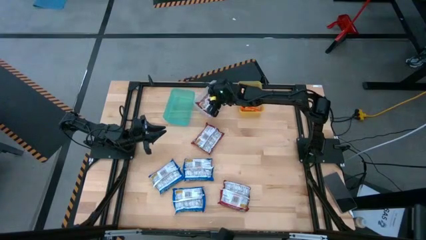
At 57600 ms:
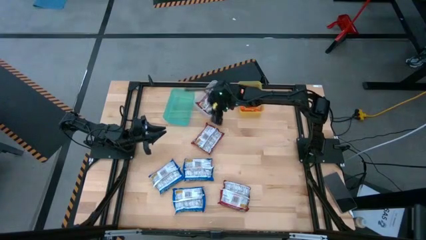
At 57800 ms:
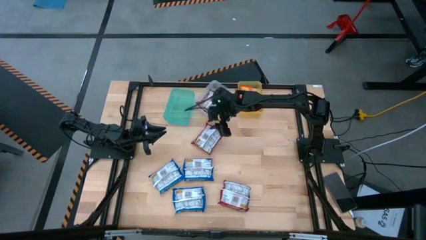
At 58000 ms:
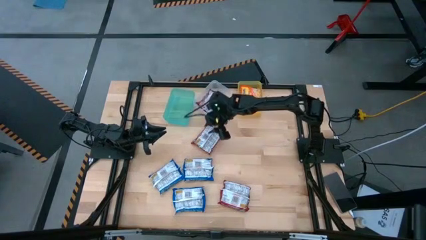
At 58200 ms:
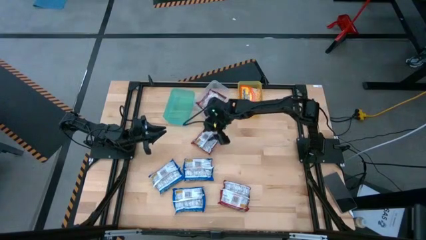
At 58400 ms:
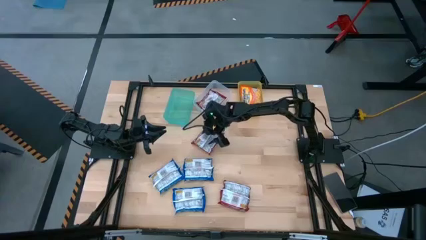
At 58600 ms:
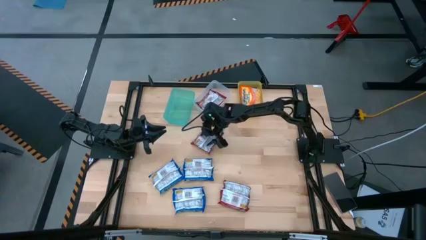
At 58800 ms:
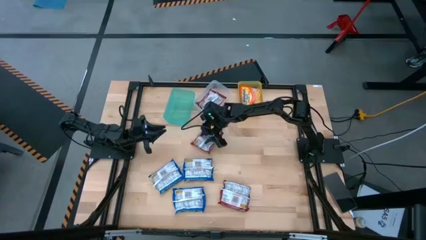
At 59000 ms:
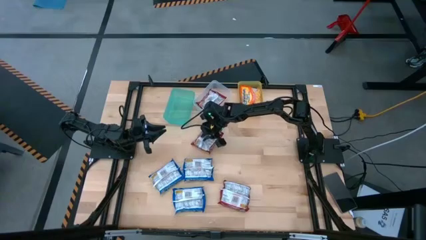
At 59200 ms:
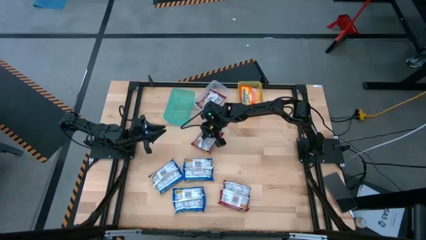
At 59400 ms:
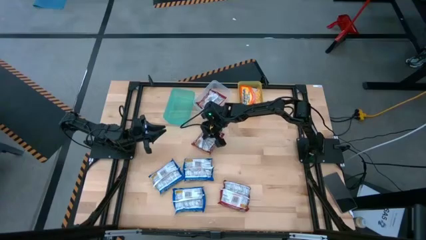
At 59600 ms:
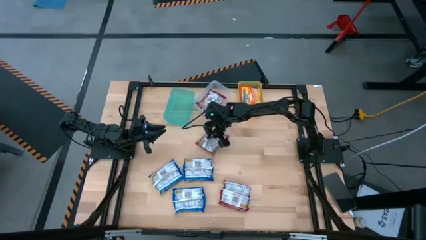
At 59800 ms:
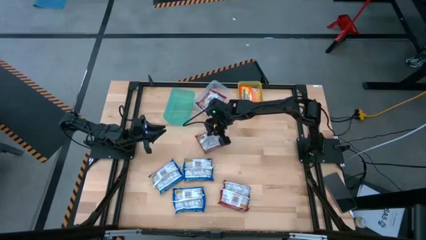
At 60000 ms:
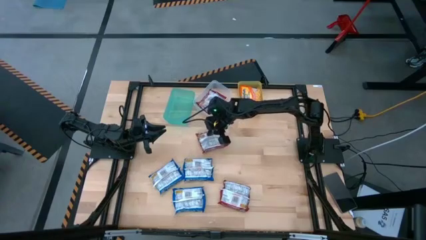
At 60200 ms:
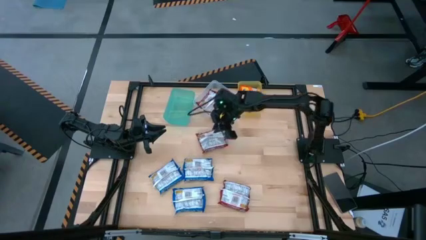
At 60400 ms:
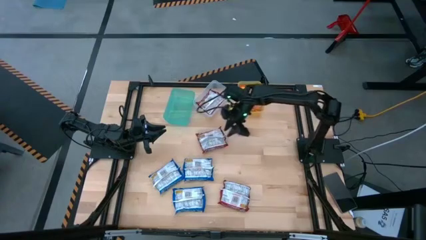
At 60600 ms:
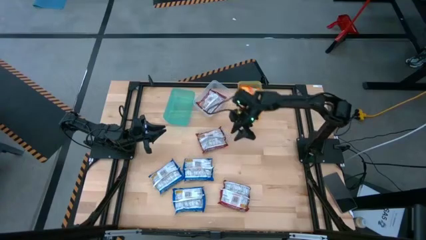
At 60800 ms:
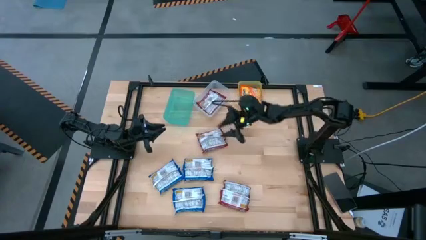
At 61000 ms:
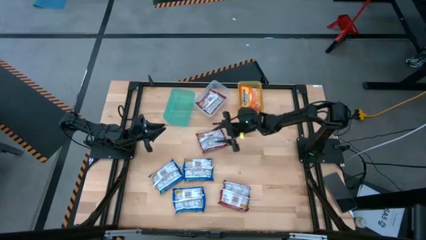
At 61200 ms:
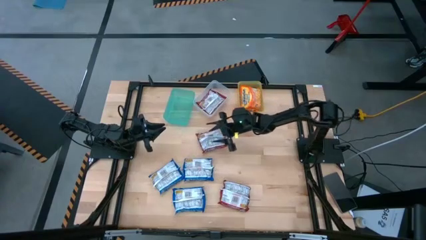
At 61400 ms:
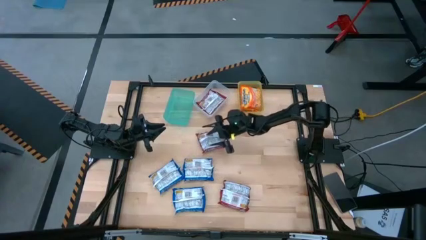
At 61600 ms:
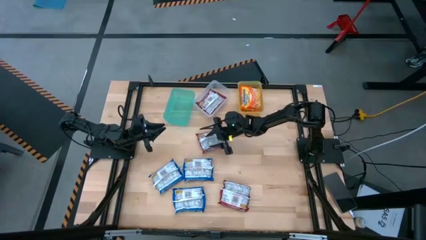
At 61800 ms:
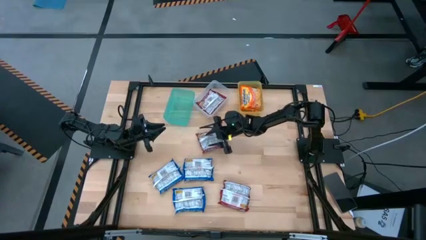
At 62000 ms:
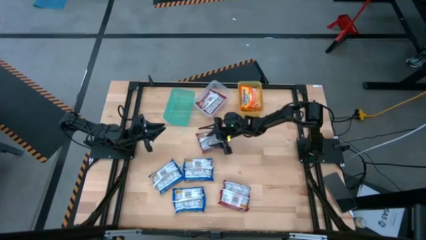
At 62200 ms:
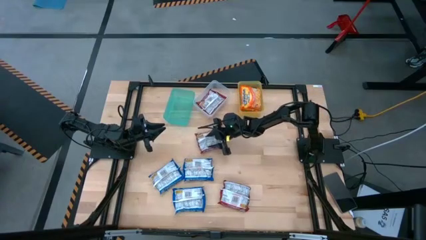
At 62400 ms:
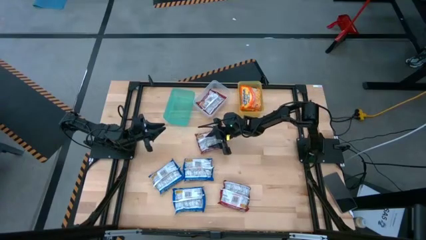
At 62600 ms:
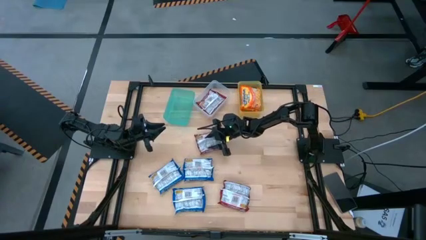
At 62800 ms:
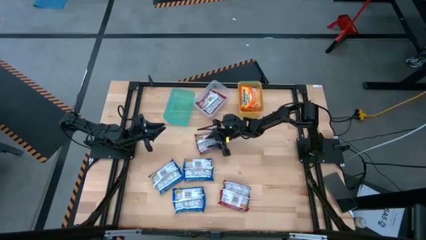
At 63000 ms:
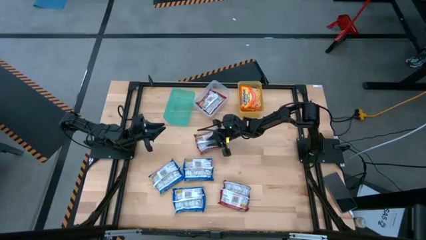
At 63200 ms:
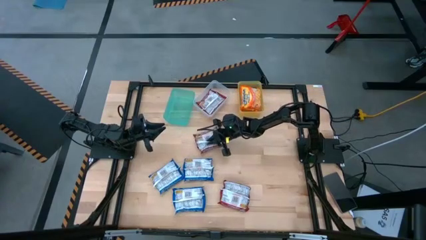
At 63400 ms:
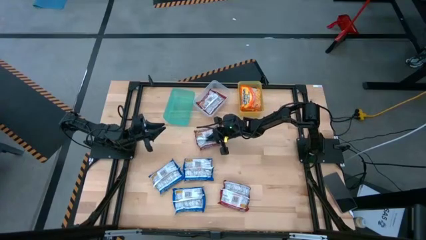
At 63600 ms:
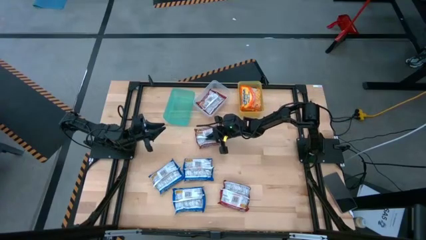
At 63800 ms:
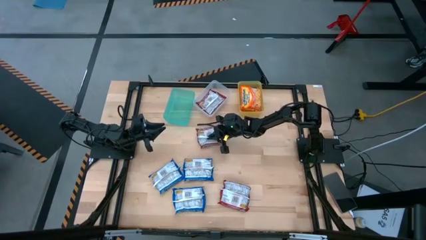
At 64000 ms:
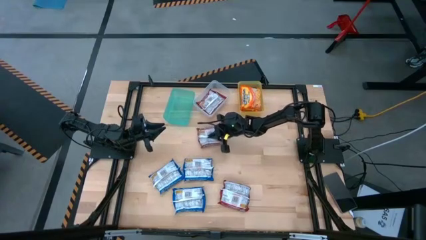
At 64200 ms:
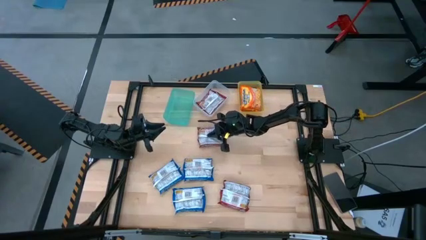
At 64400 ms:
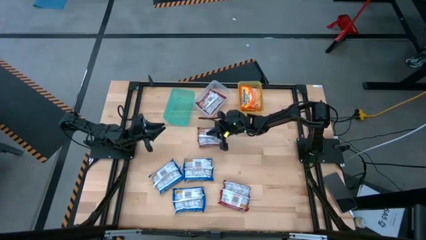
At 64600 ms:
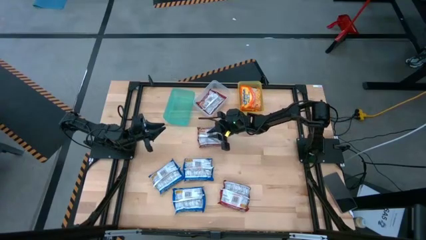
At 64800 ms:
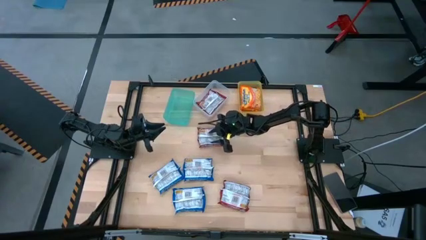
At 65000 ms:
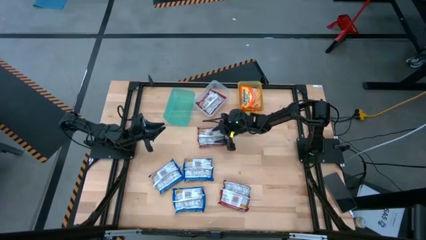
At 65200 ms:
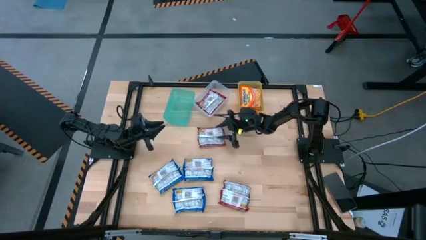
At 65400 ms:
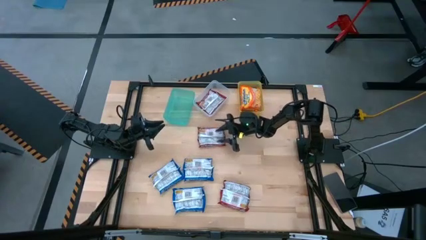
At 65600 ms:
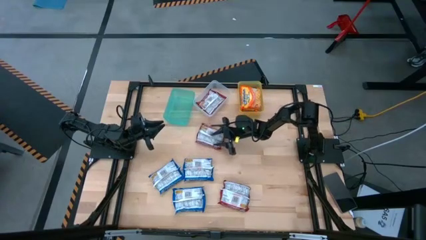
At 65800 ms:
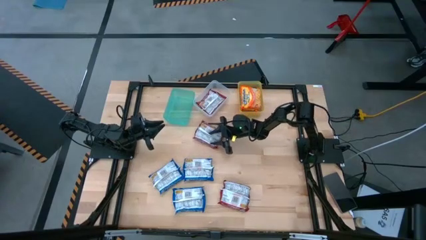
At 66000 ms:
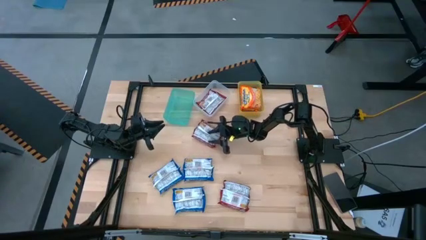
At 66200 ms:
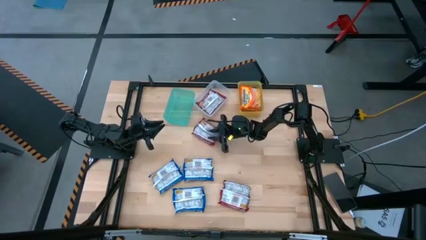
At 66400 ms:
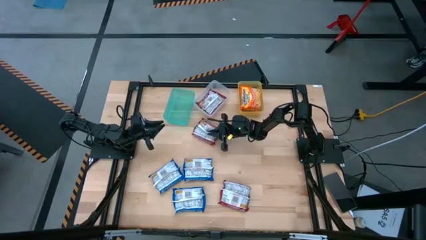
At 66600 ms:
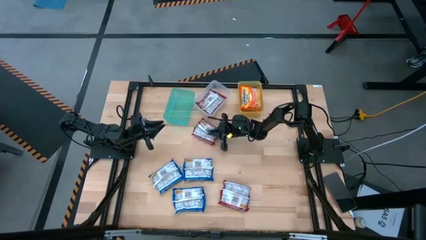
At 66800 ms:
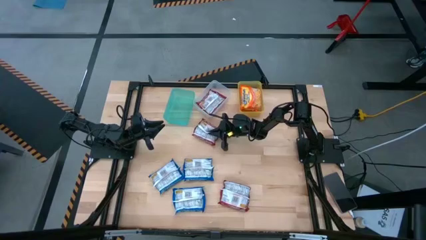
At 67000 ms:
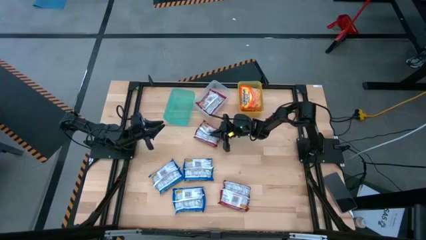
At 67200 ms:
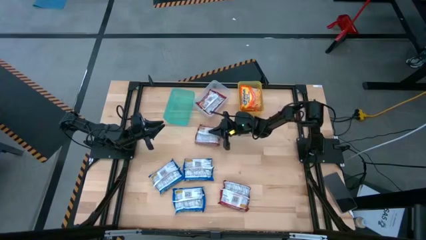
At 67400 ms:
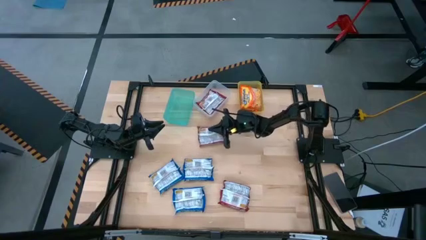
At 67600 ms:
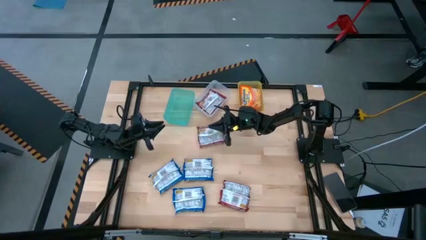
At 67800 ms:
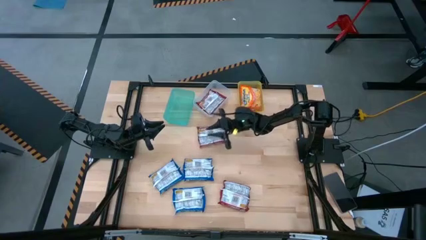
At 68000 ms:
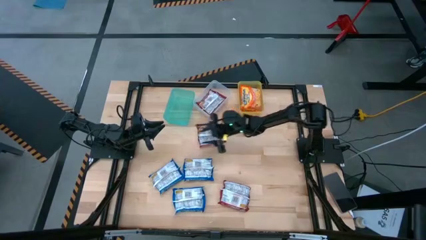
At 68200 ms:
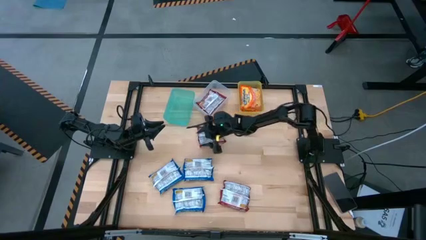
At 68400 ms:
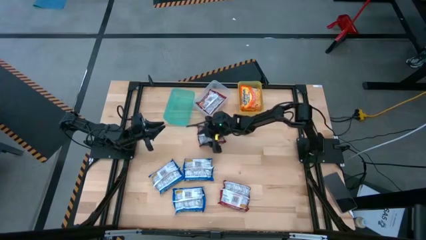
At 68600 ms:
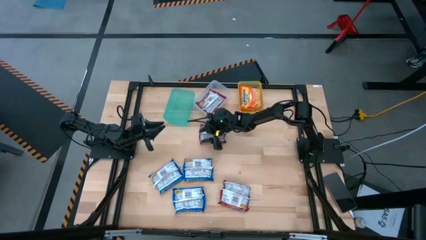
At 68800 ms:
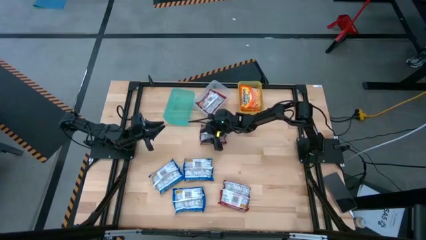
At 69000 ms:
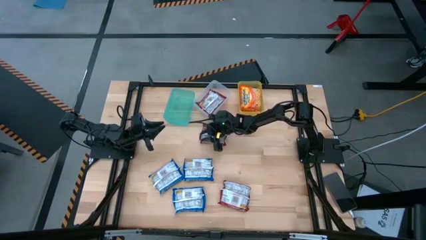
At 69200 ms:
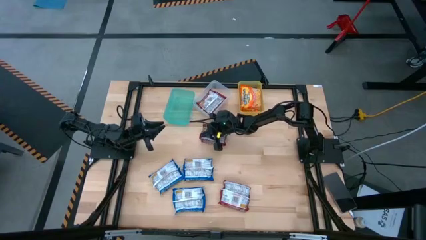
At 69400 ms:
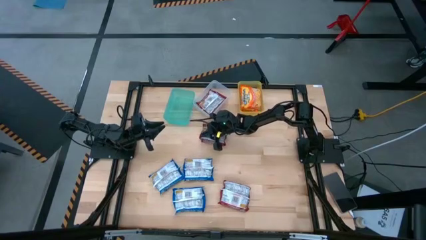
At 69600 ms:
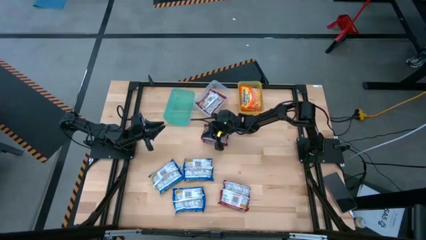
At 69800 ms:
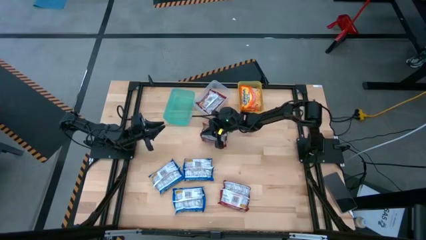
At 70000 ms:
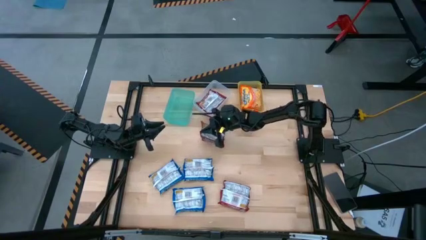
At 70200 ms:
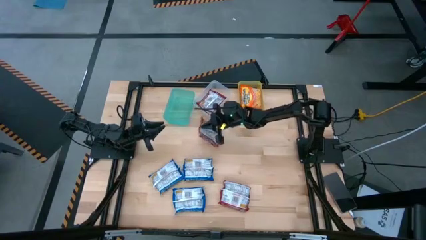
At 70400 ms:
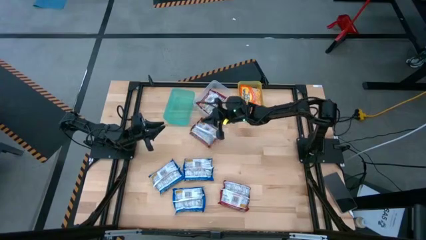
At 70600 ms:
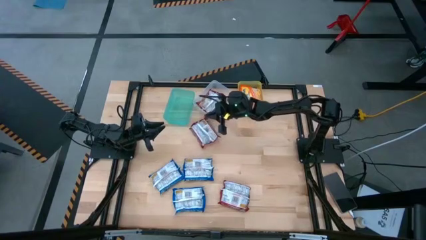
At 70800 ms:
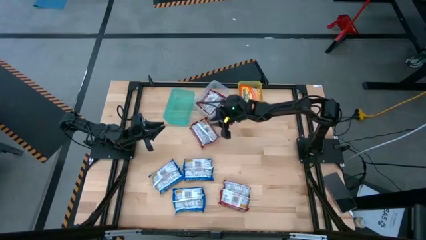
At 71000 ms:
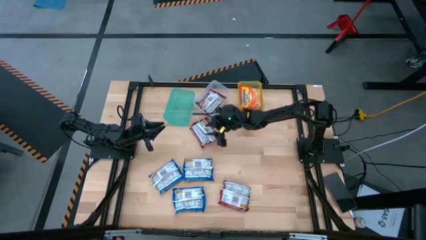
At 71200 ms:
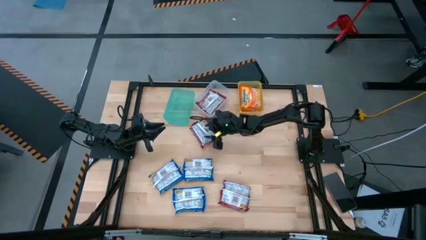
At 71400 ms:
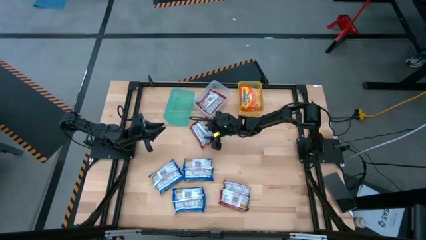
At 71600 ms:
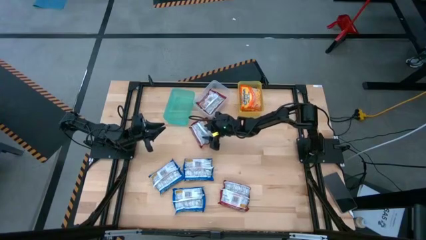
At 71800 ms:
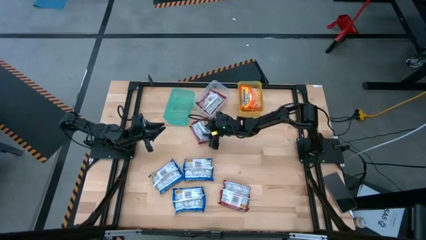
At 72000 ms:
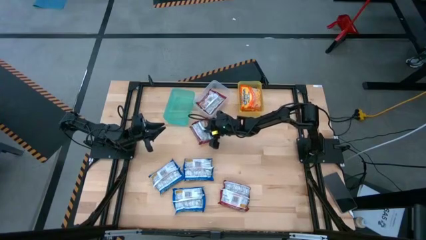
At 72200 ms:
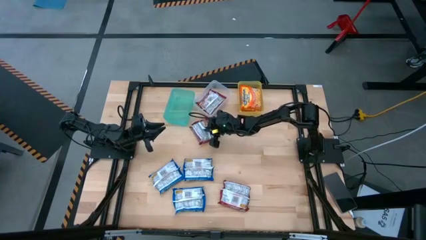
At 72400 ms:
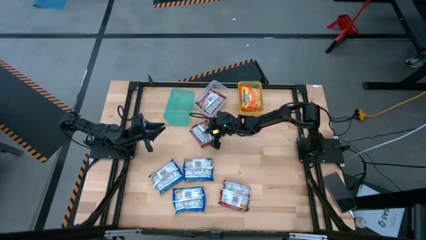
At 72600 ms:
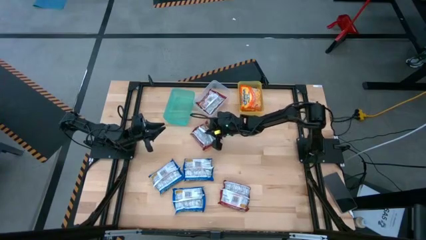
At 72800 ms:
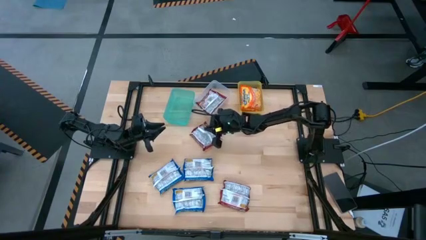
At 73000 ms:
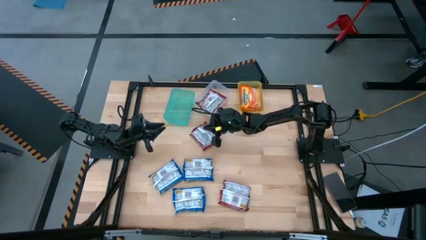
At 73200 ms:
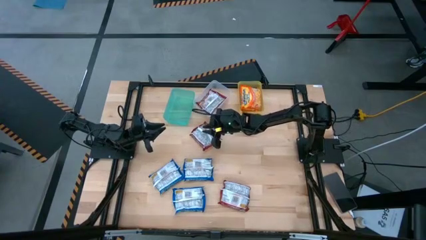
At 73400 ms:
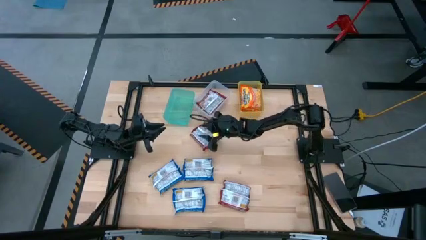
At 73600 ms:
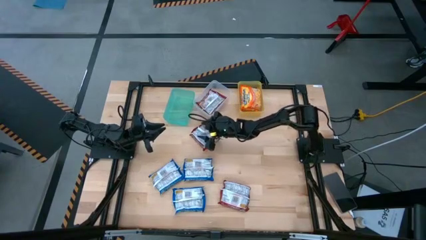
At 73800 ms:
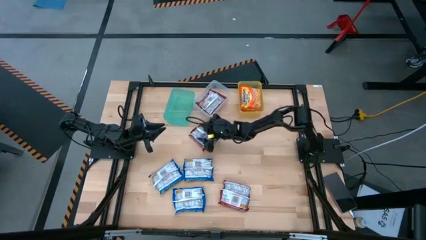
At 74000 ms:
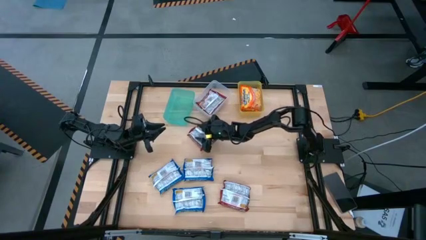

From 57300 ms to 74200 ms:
Task: Sort Maruchan noodles
Put the top red noodle pack into the transparent bin
